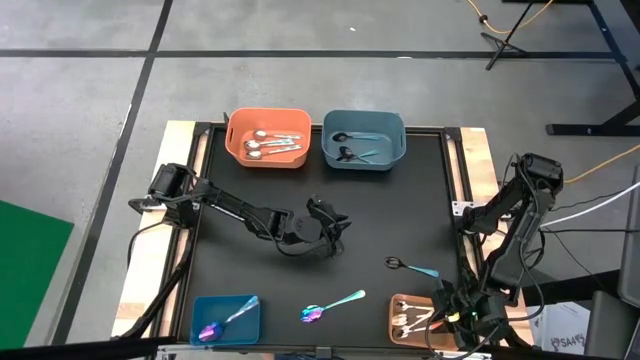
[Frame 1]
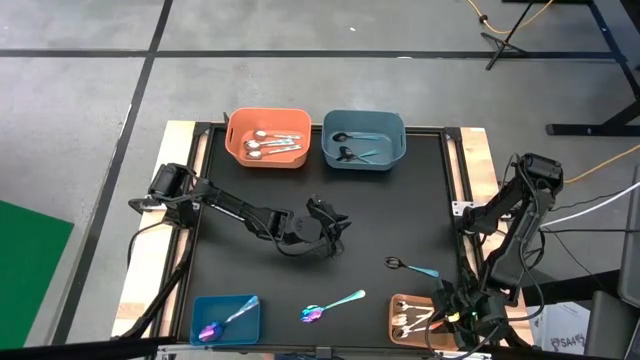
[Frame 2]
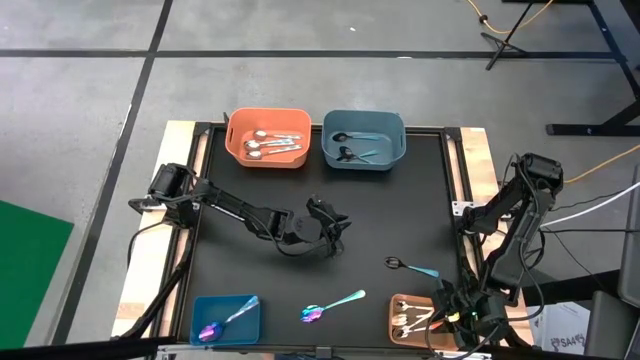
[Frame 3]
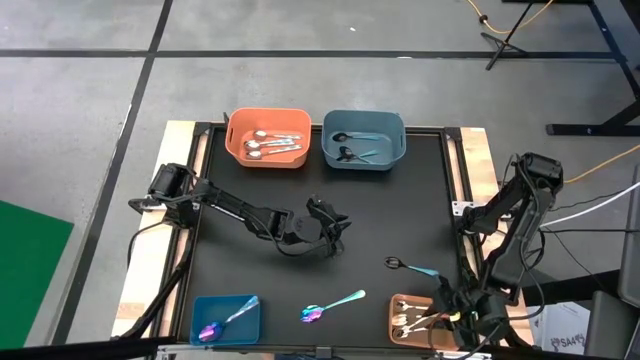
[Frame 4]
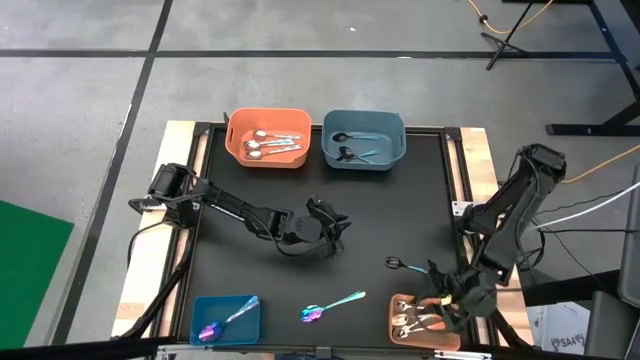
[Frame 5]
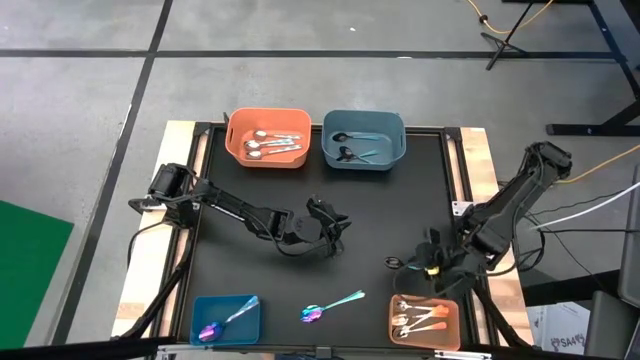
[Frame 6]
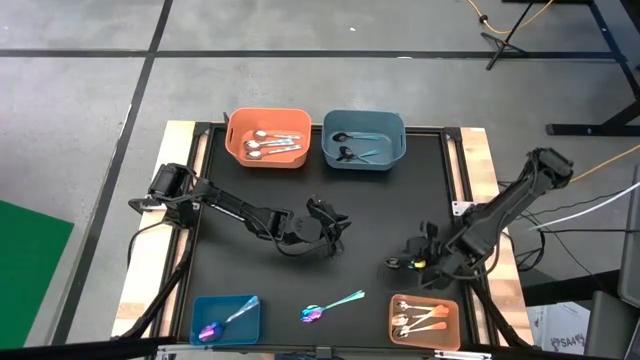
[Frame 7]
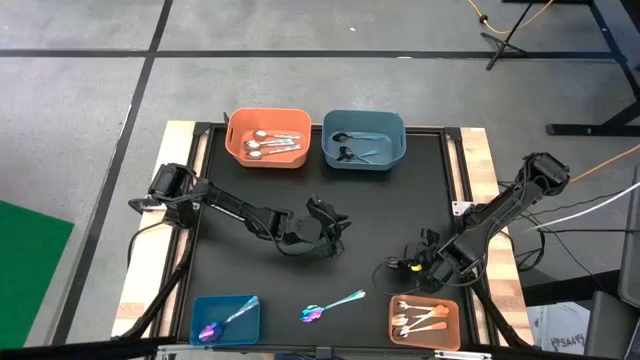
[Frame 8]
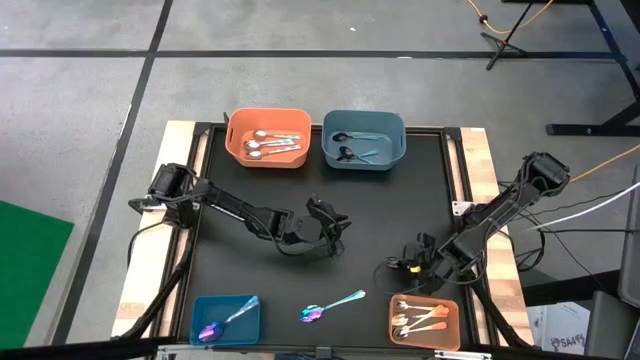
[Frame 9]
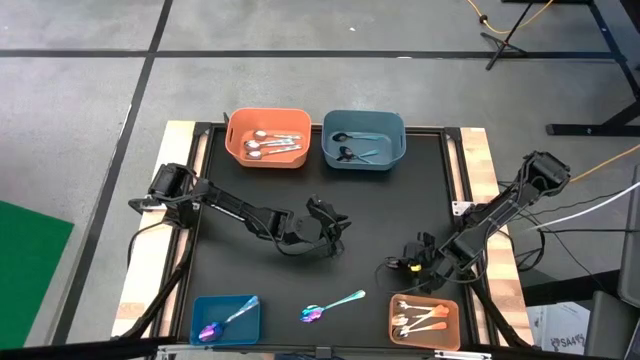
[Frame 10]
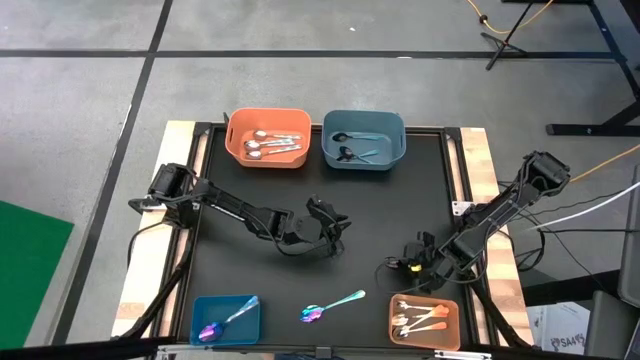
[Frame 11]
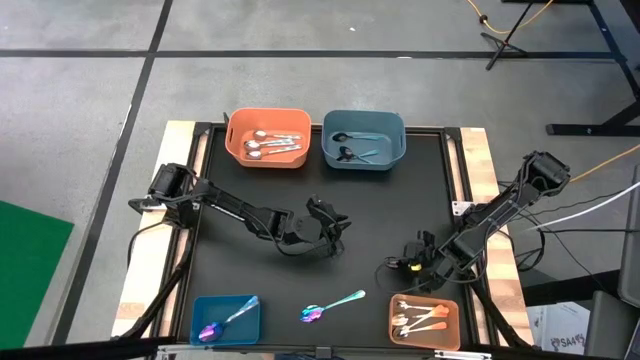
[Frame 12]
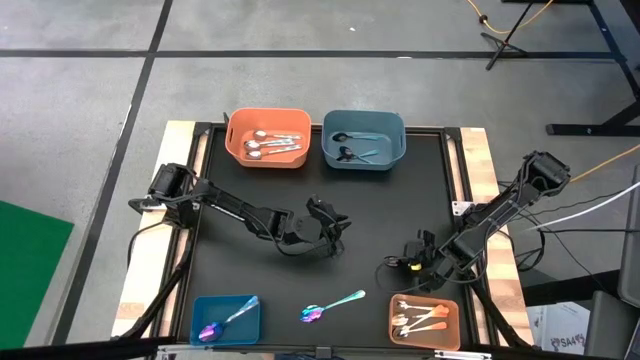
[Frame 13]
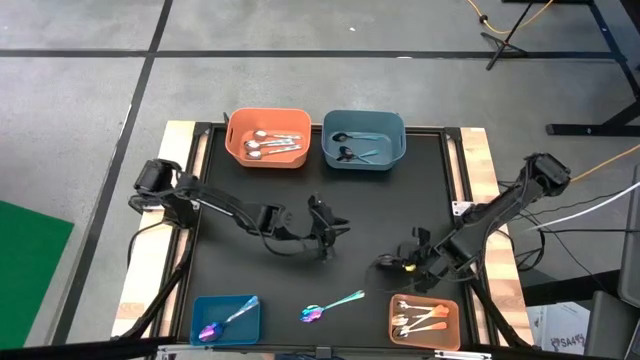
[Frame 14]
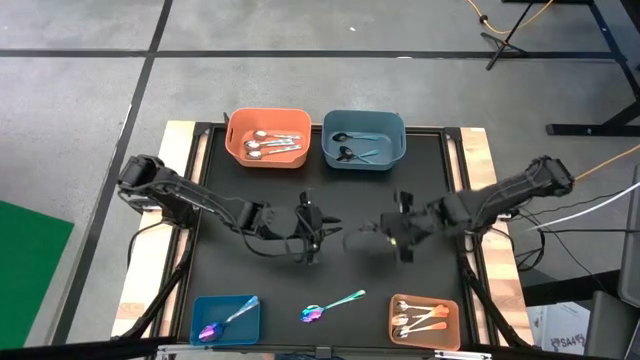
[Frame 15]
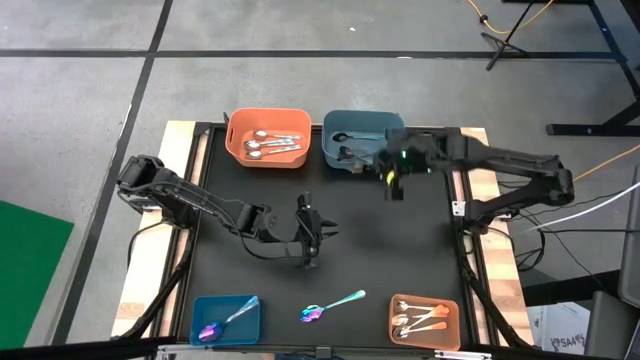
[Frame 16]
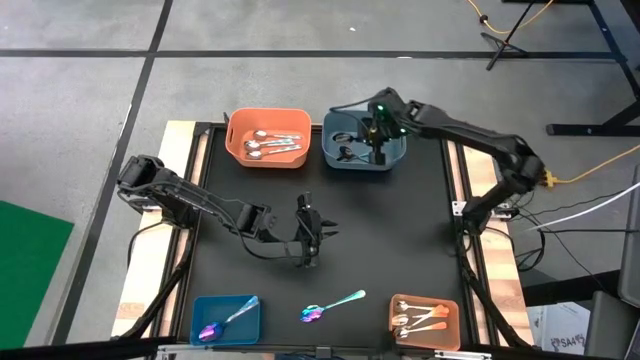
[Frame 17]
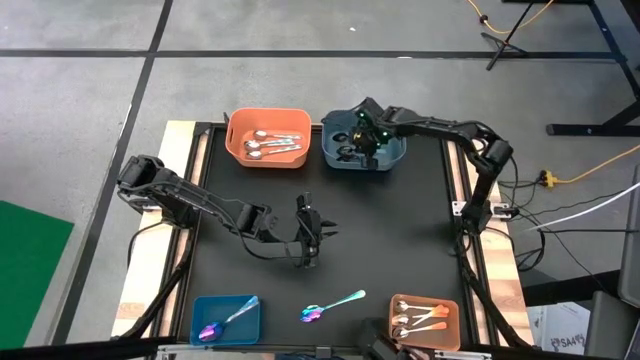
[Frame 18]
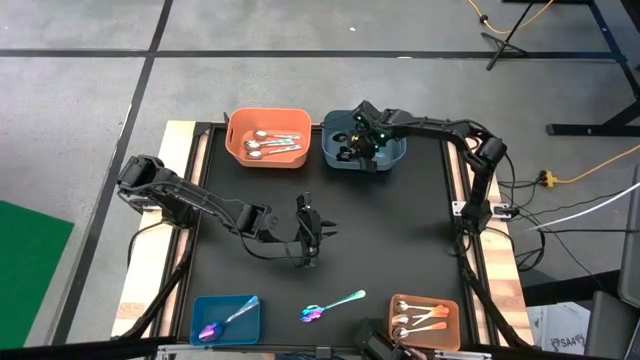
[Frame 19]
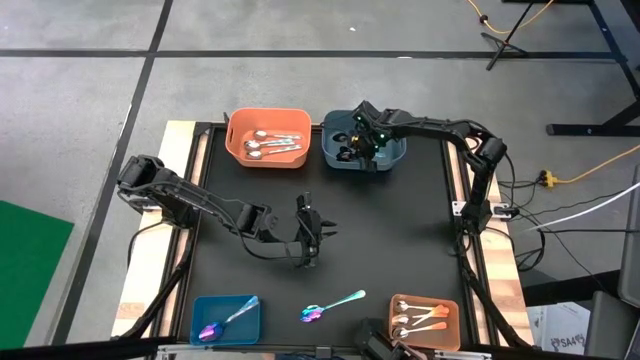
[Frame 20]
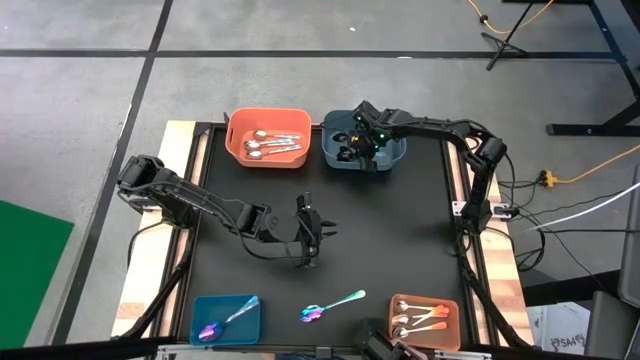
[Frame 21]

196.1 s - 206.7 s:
Task: Sort silverware by color (type)
Put the blue spoon into the top blue bin

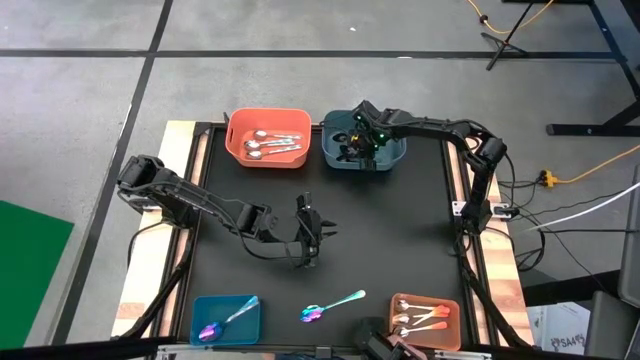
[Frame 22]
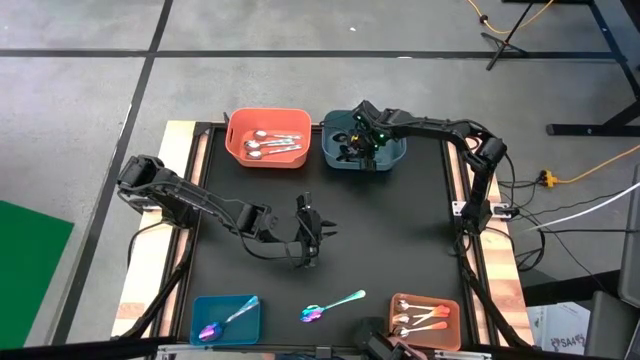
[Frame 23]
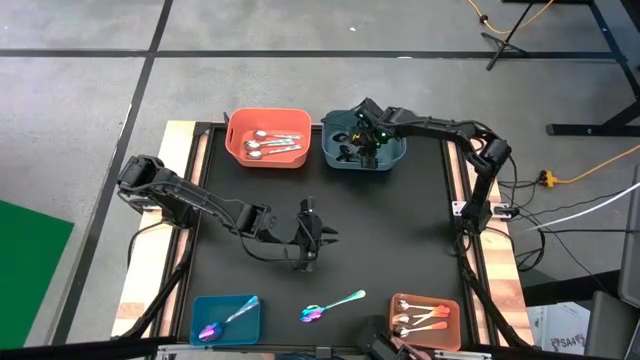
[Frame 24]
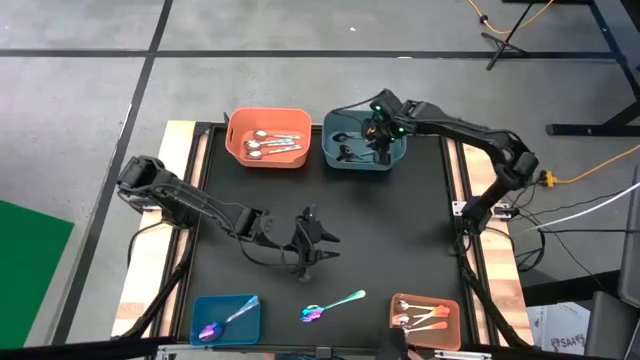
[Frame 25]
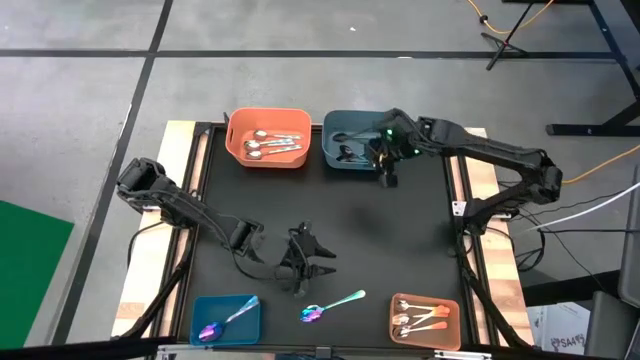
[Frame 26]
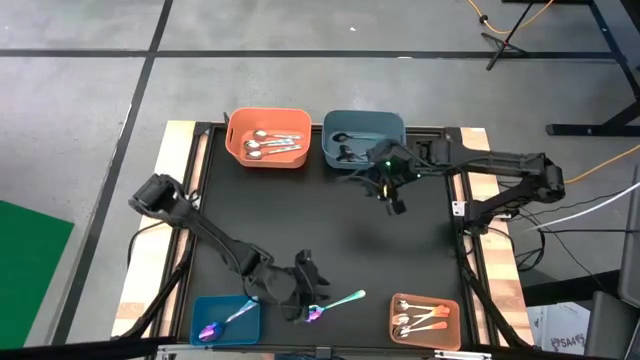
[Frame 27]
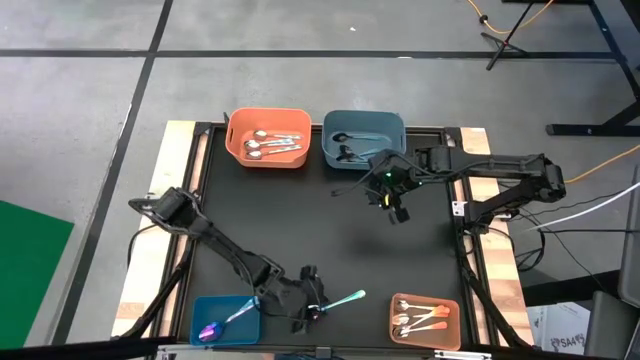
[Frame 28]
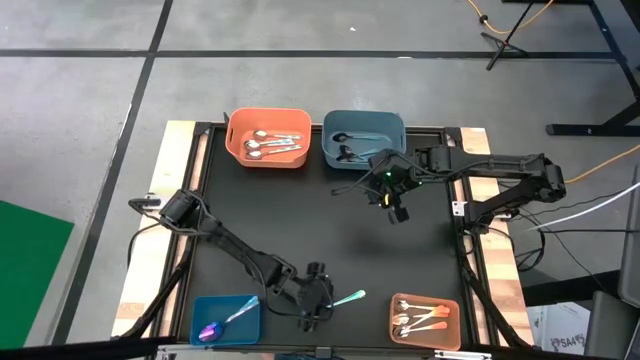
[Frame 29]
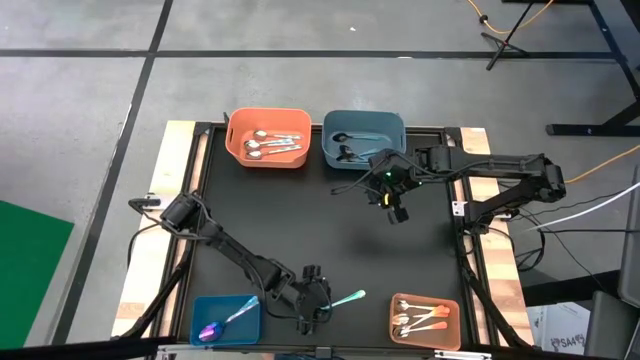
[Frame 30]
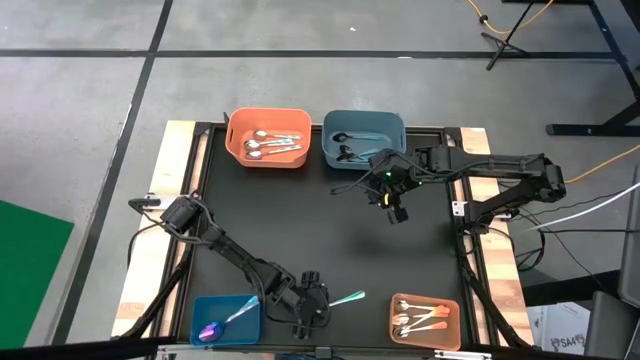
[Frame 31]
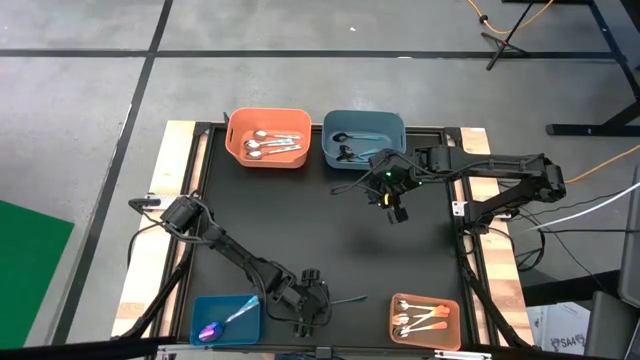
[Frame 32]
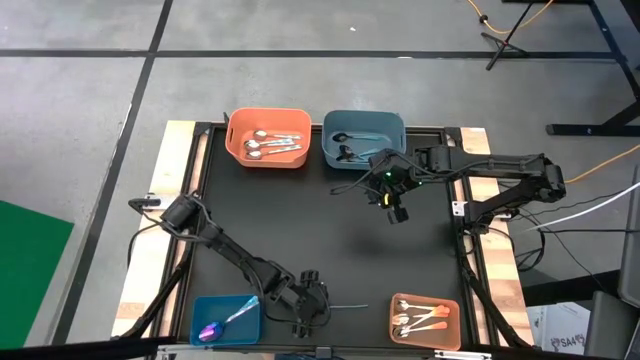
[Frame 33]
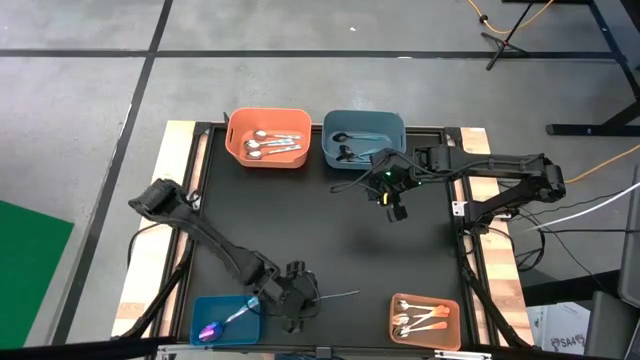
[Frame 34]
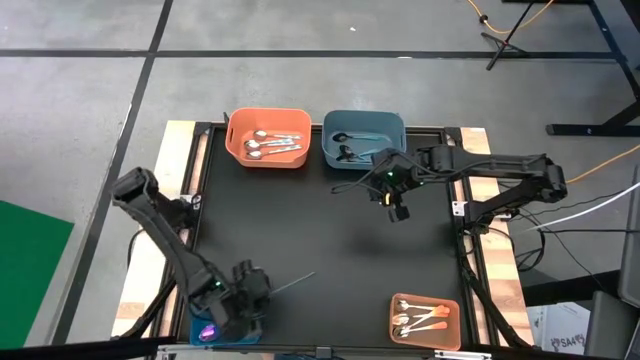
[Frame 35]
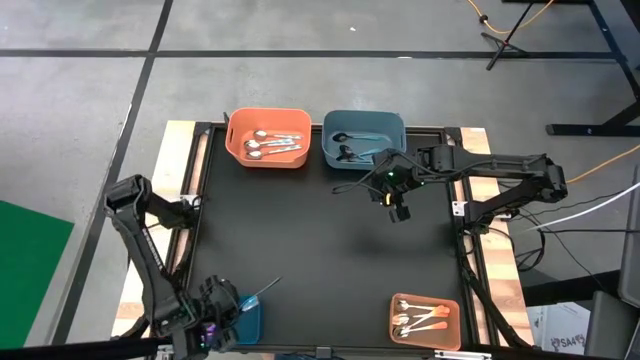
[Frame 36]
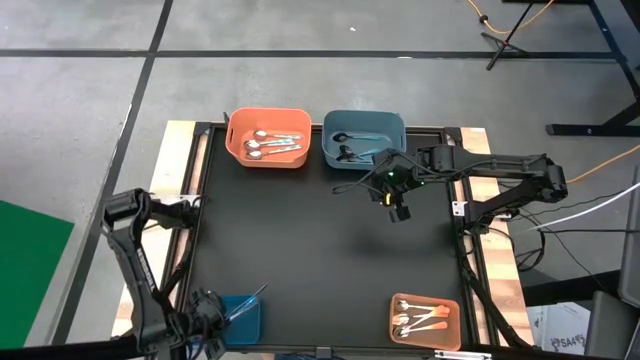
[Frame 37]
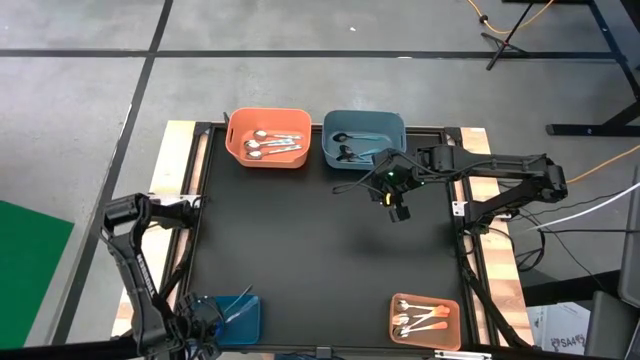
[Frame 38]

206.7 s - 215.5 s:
Put the purple spoon into the bottom blue bin

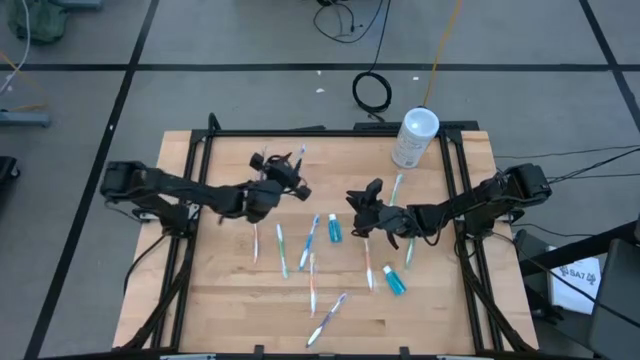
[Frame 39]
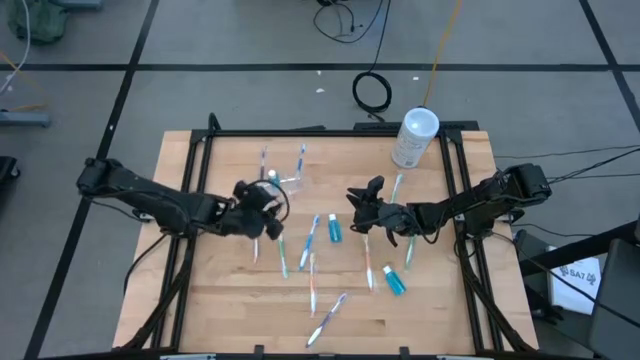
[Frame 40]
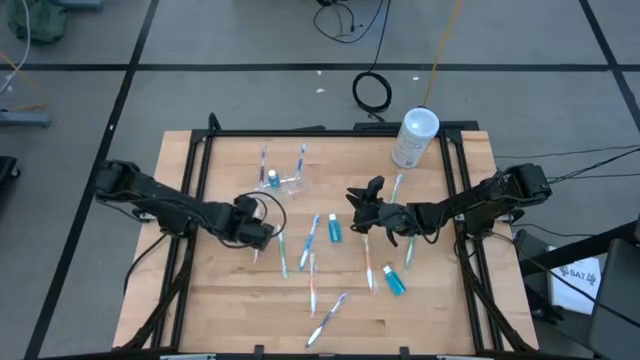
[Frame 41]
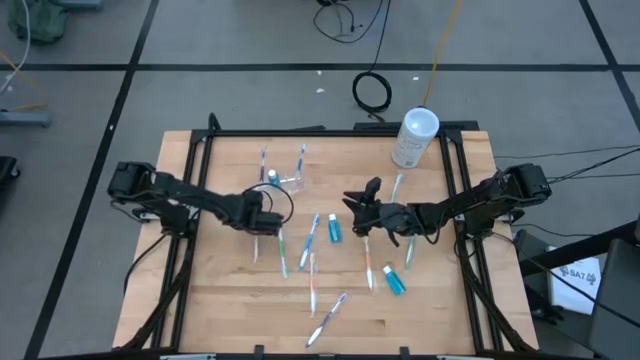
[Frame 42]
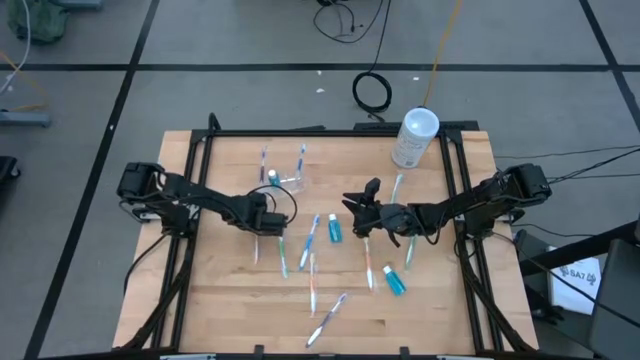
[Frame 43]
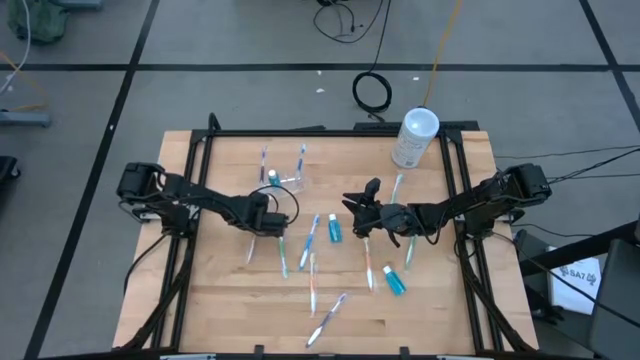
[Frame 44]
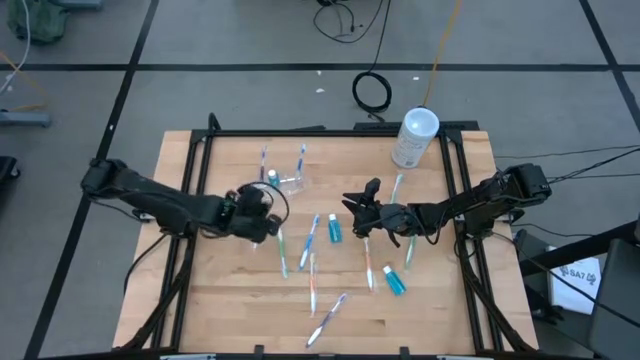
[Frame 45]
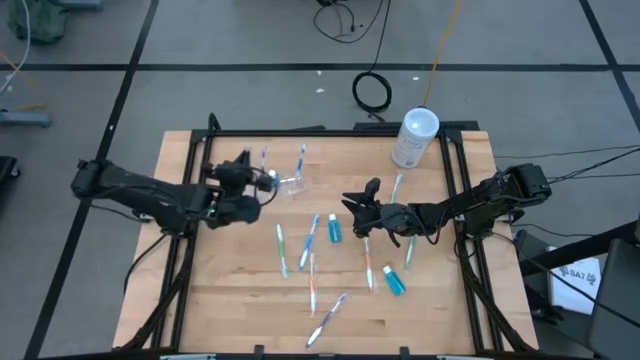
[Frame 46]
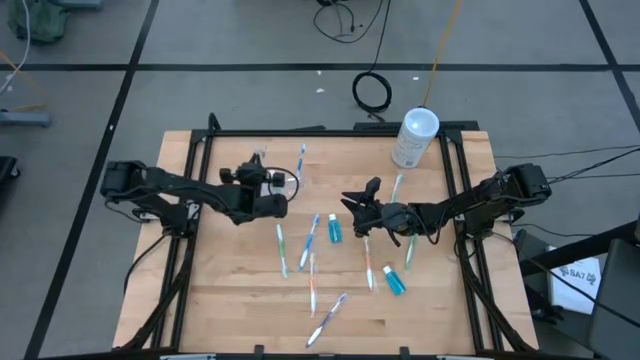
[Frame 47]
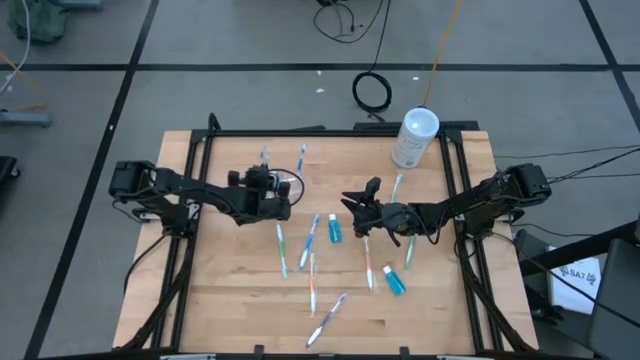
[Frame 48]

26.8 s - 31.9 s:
Task: Pick & Place toothbrushing station
Put the top orange toothbrush into the left compartment of the transparent organizer
